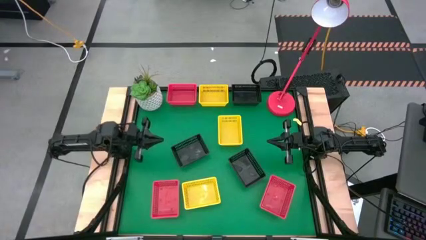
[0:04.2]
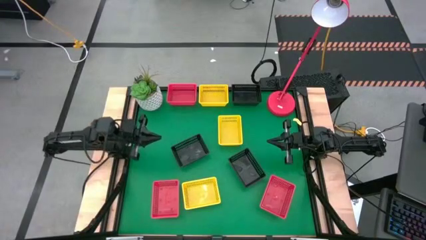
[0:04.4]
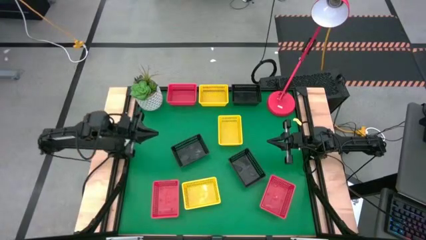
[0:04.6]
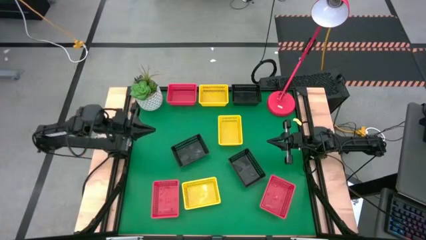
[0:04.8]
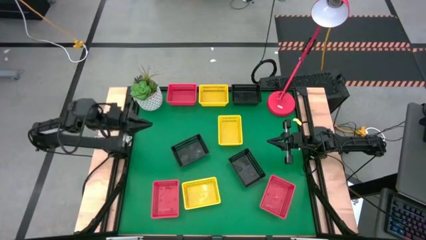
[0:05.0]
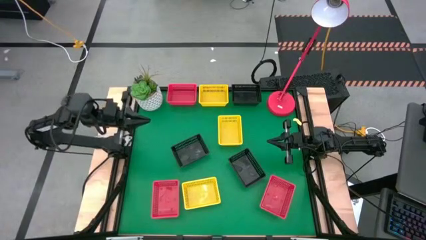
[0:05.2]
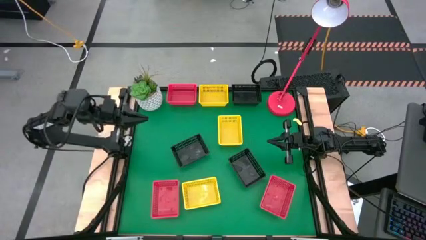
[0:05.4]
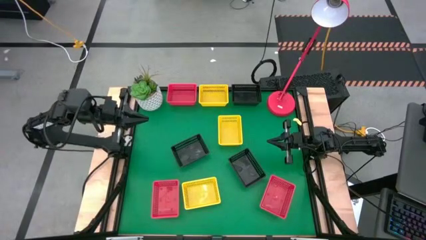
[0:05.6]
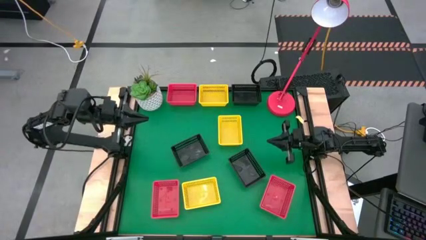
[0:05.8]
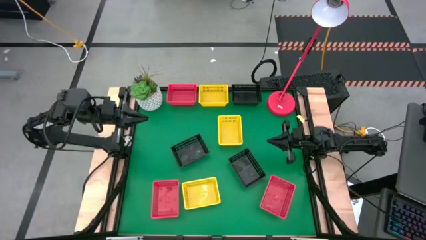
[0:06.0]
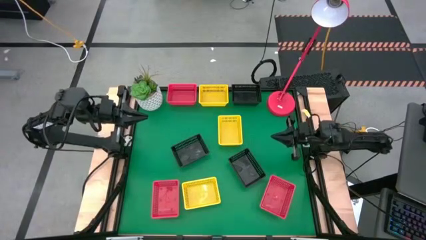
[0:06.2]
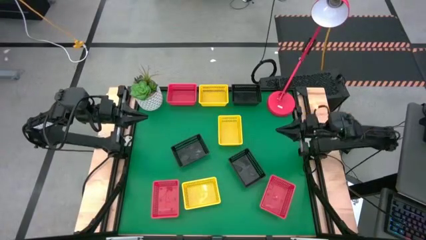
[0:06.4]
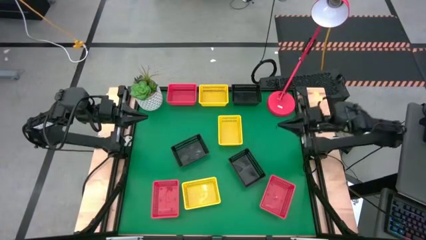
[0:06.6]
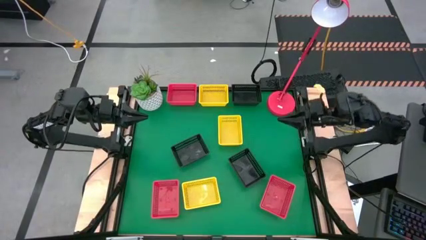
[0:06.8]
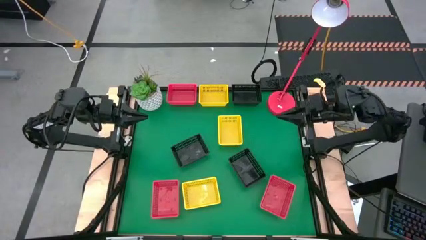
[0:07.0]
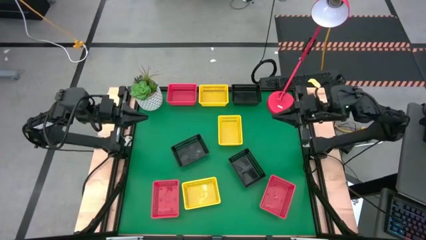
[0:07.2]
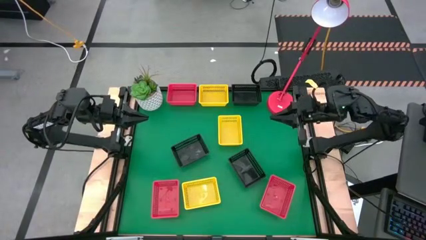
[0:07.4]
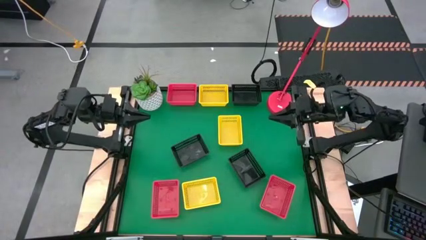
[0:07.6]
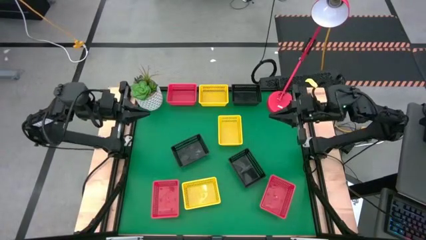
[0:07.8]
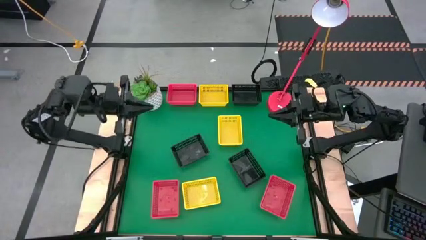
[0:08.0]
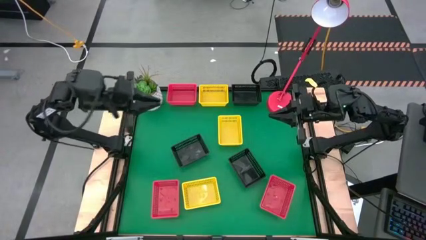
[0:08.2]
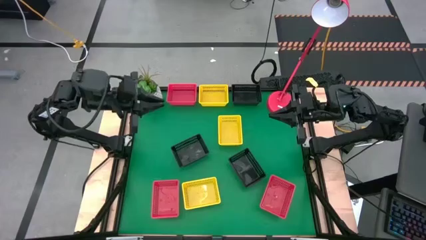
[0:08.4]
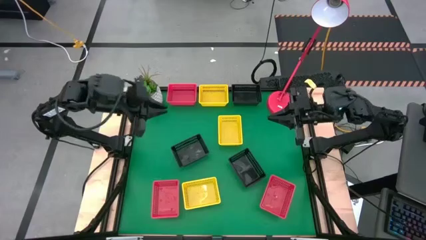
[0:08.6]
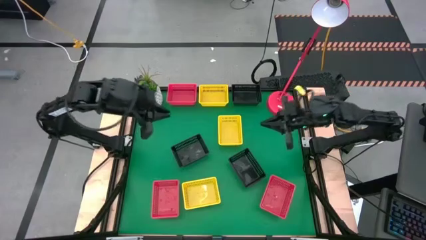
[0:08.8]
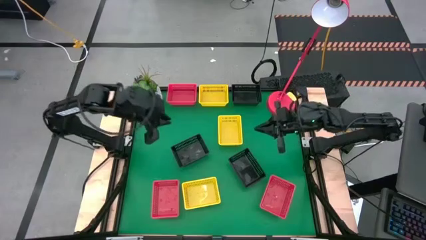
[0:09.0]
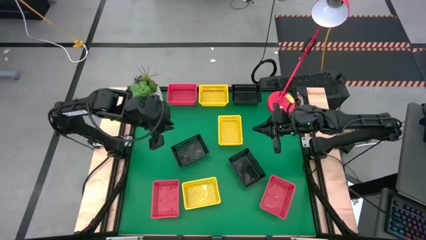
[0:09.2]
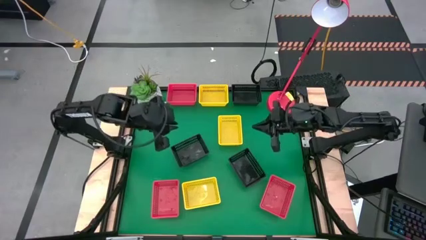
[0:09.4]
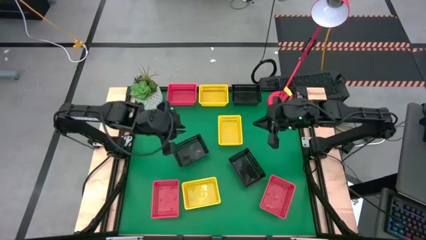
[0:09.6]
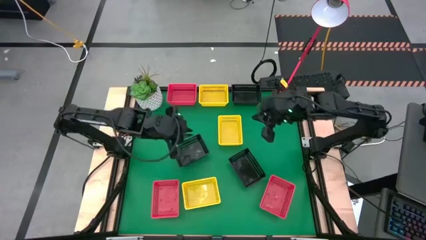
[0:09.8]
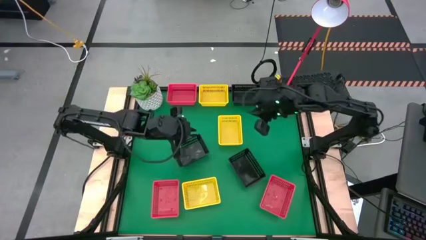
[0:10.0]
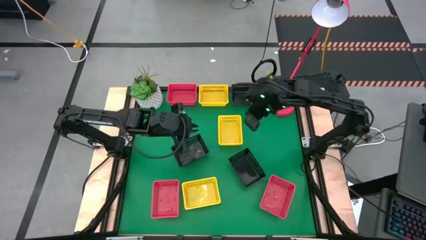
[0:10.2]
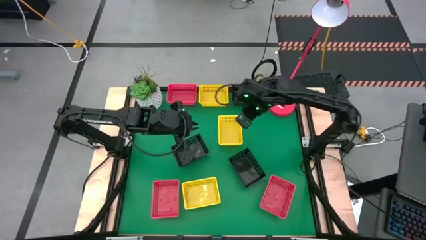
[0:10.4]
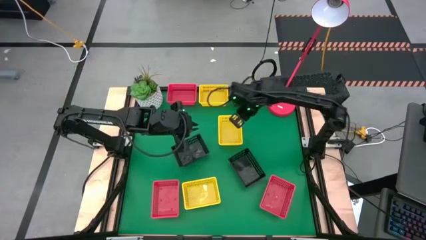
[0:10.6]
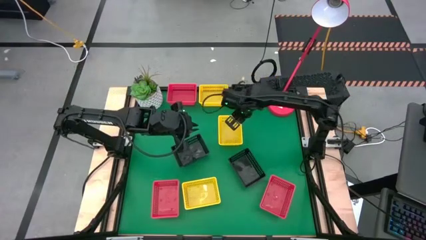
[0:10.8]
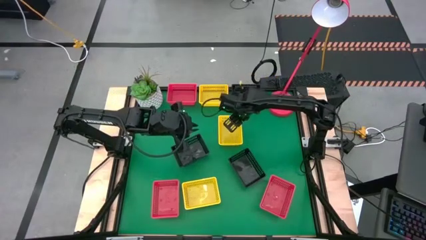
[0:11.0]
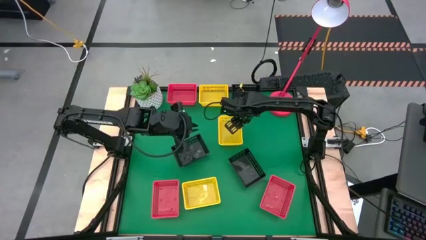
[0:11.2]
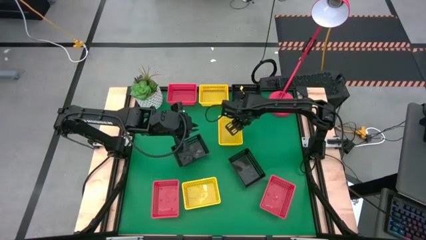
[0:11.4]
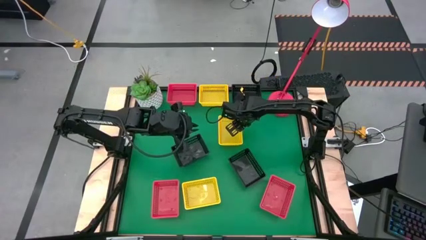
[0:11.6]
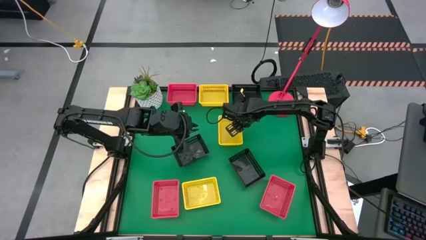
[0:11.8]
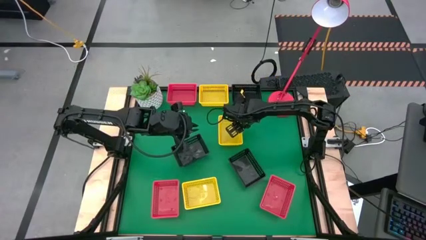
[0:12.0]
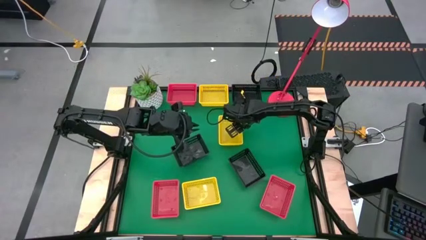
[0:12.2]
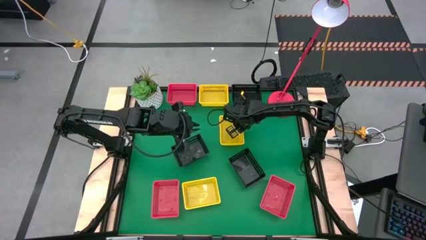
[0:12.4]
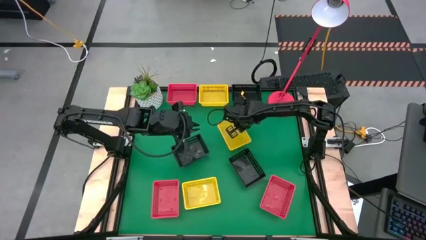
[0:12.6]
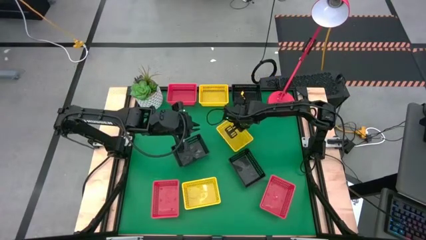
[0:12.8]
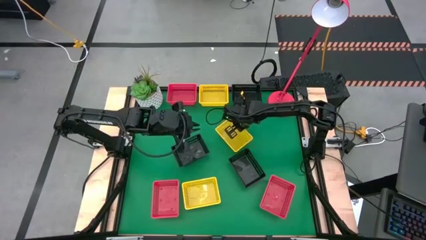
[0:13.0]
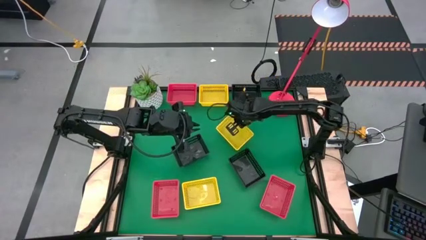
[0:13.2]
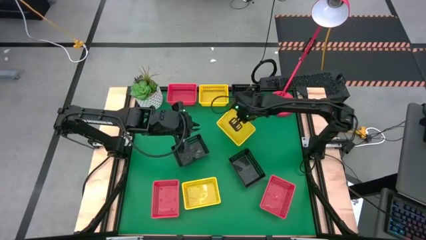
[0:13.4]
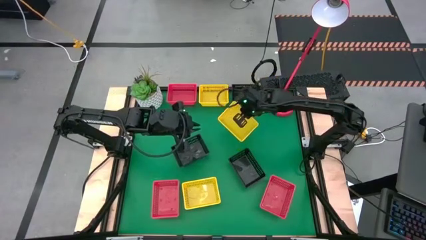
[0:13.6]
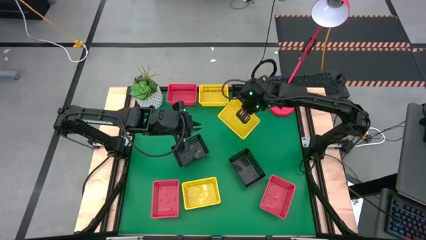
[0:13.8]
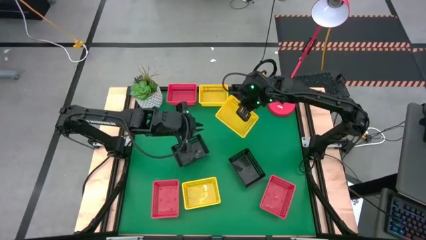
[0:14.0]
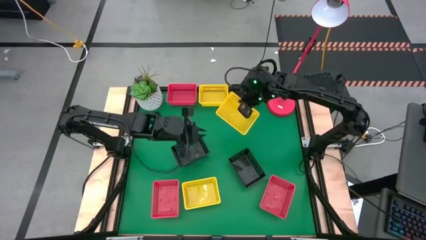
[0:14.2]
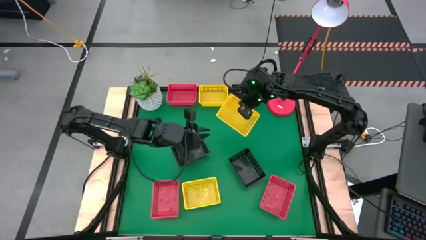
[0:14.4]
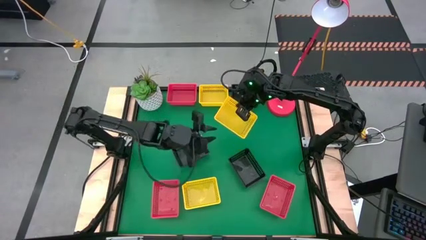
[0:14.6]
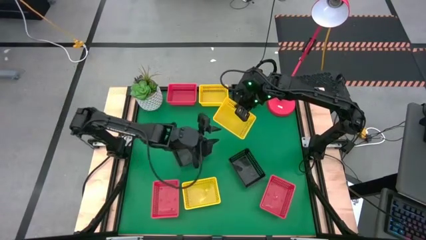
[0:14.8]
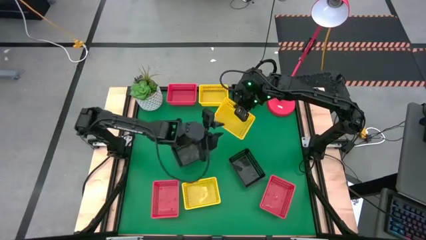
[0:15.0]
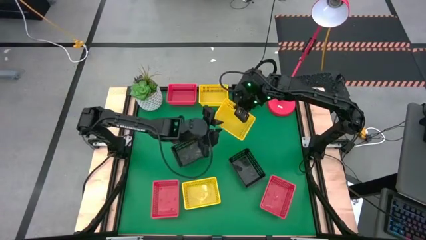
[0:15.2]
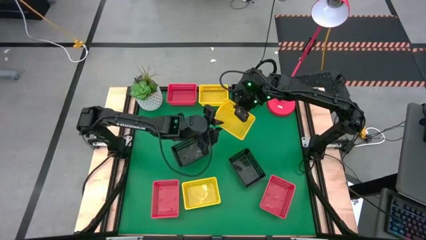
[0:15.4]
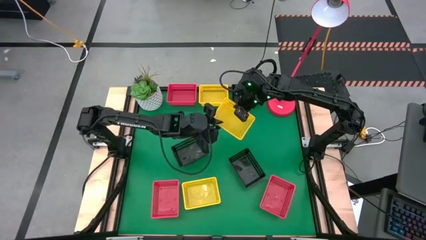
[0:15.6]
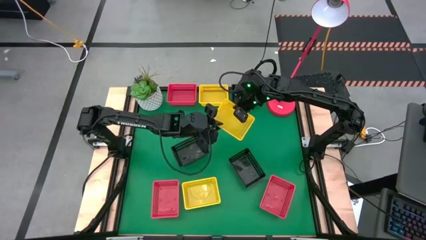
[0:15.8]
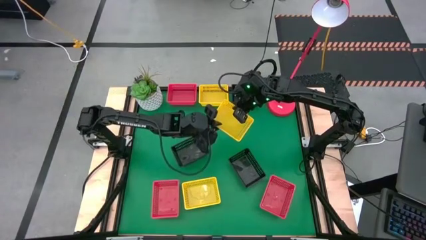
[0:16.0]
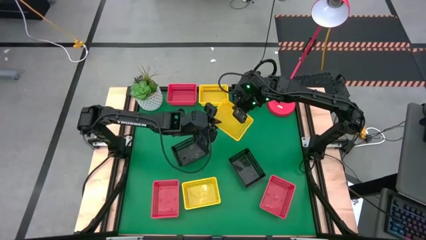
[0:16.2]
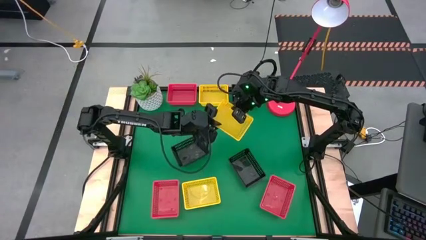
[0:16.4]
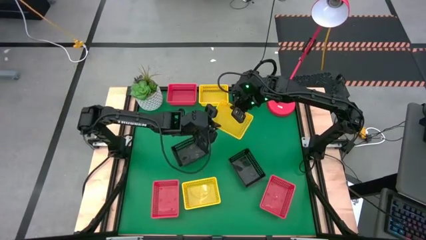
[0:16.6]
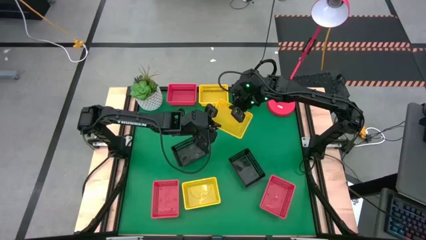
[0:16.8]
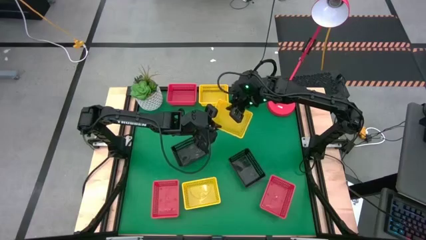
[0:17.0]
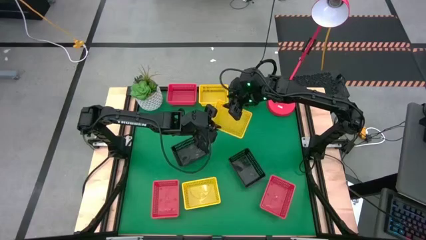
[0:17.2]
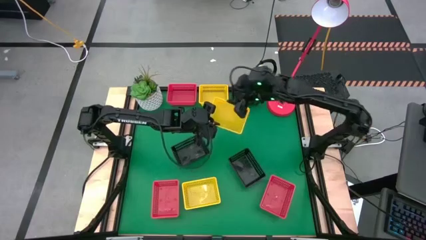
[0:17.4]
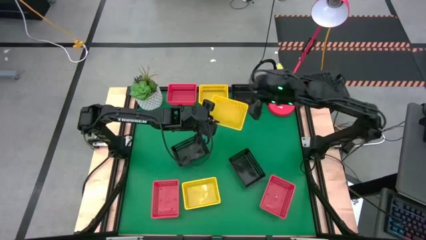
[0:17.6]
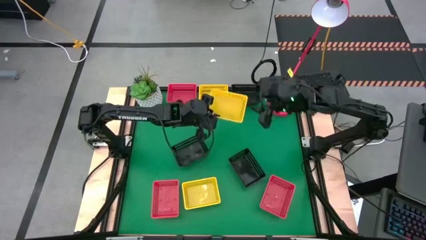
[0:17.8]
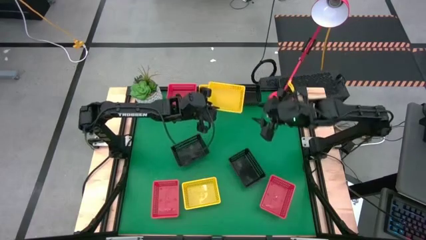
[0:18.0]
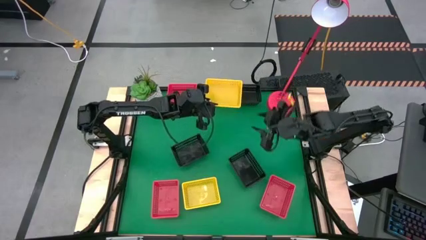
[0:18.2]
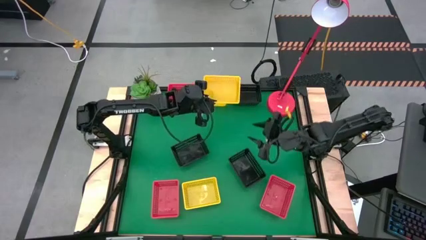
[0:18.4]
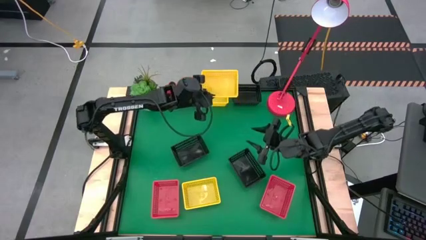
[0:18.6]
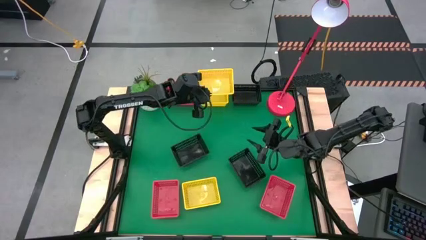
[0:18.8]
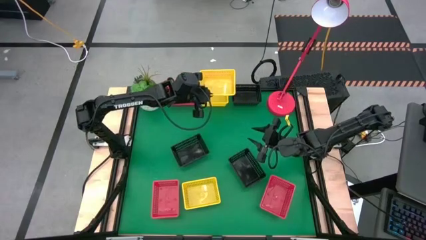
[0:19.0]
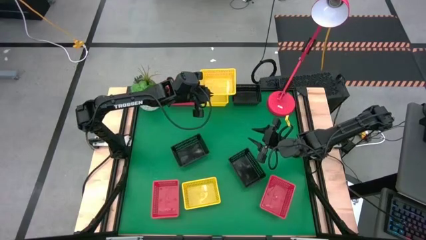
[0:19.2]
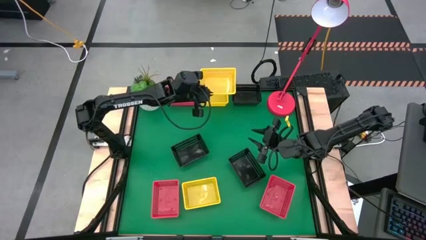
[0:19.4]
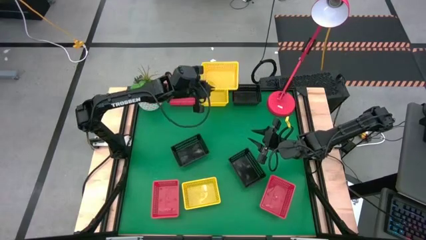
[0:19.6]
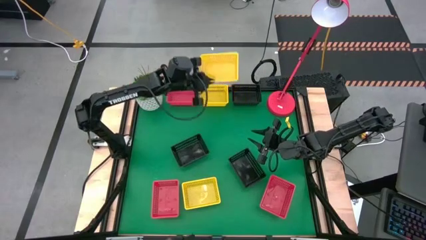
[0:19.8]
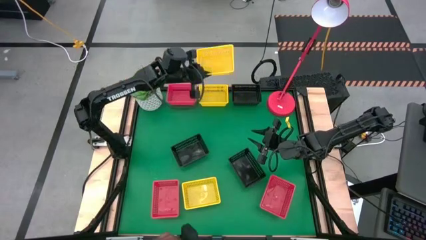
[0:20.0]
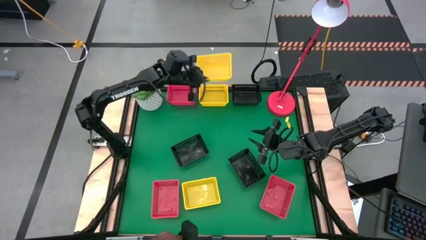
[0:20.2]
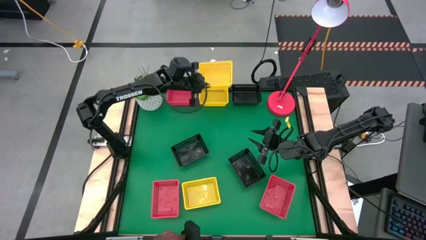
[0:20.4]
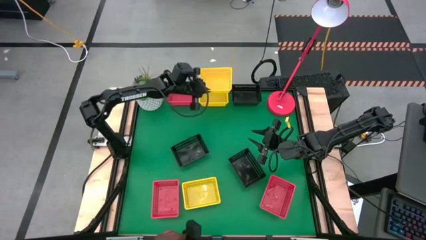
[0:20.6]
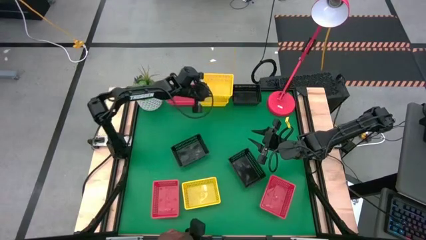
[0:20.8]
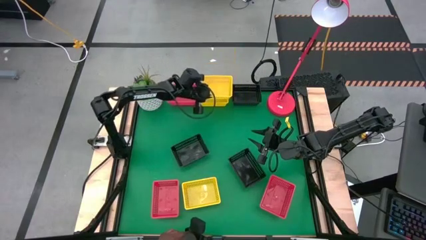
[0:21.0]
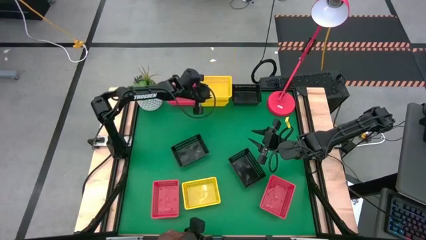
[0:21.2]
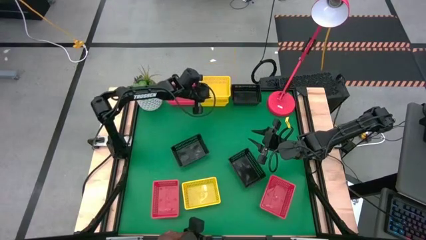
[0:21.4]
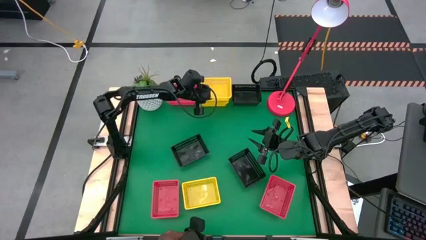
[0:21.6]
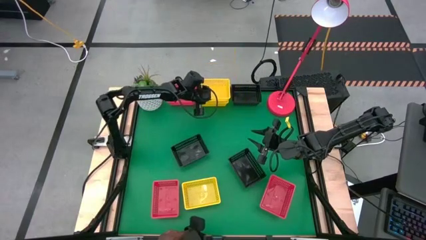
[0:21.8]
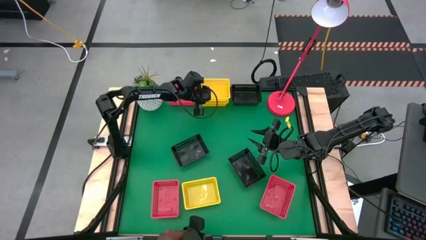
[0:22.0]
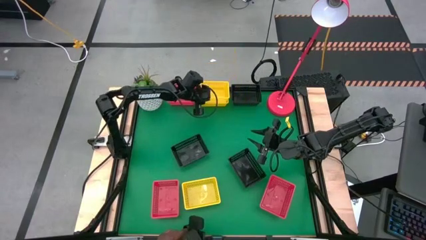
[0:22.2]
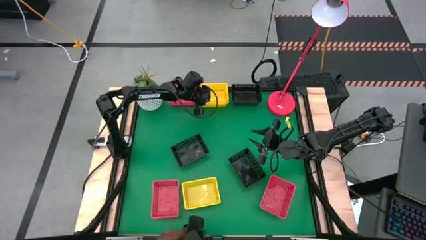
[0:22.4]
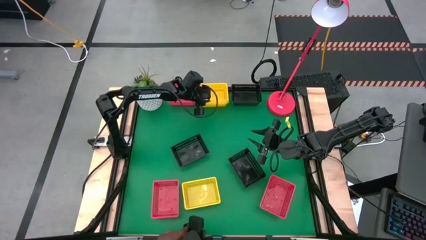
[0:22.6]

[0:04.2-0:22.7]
Stack the middle yellow basket on the top yellow basket
